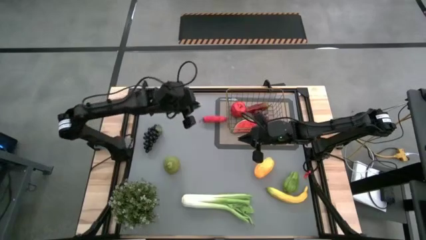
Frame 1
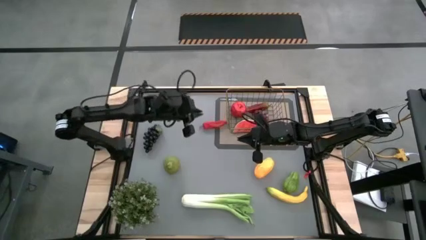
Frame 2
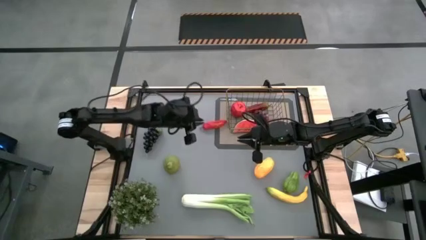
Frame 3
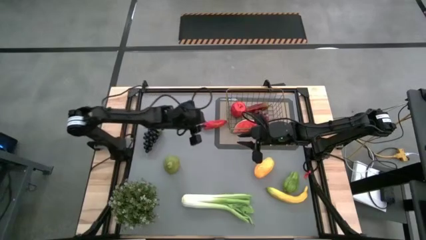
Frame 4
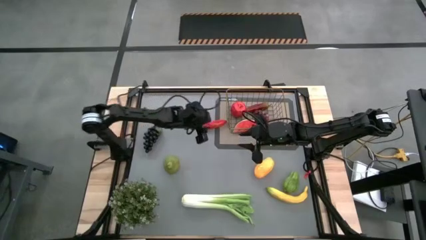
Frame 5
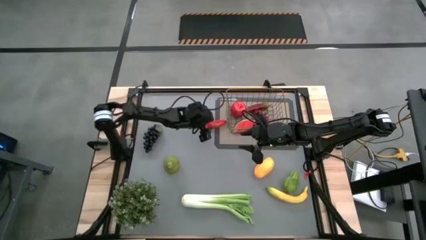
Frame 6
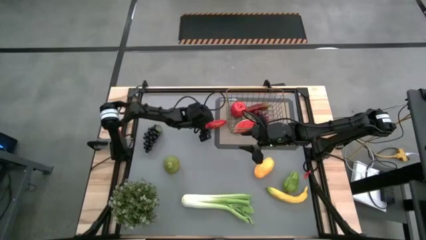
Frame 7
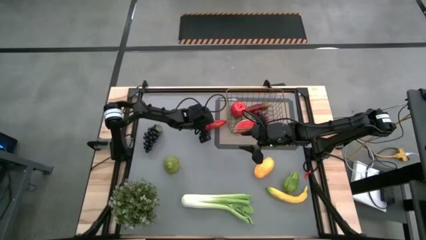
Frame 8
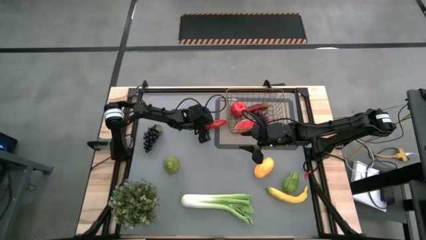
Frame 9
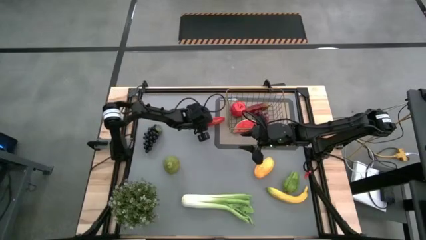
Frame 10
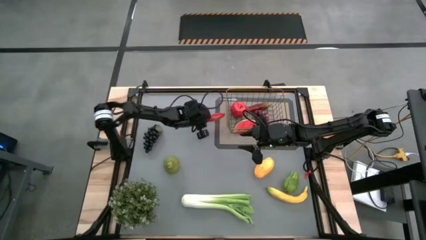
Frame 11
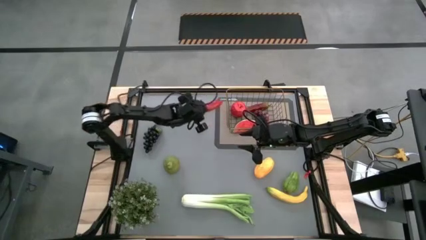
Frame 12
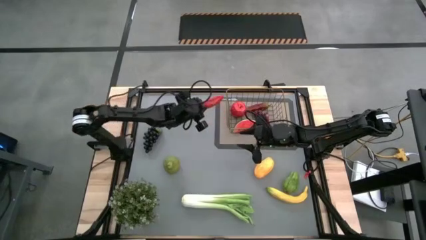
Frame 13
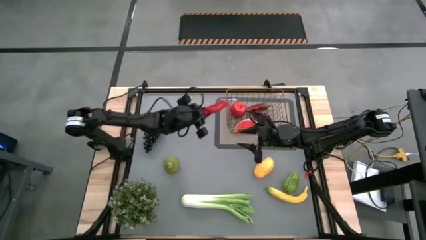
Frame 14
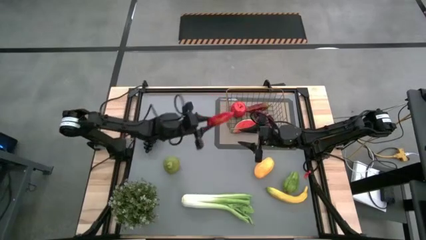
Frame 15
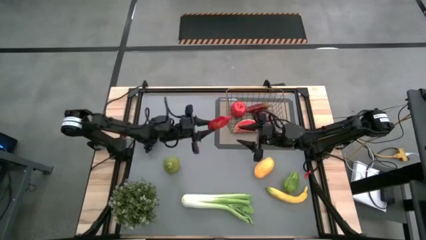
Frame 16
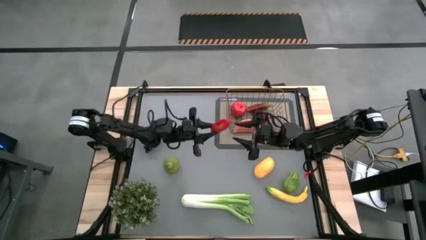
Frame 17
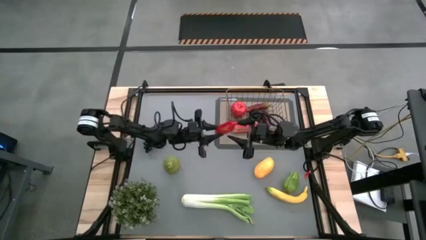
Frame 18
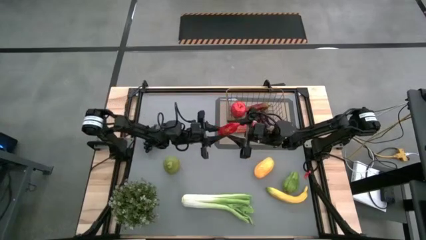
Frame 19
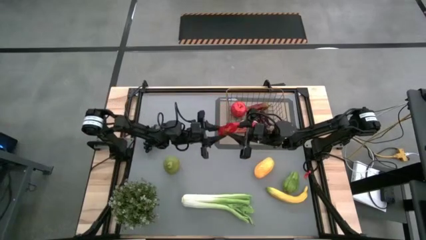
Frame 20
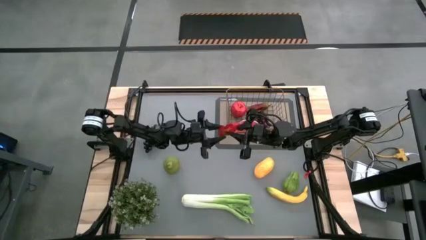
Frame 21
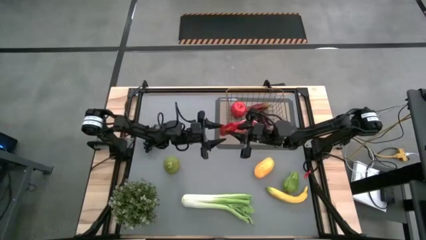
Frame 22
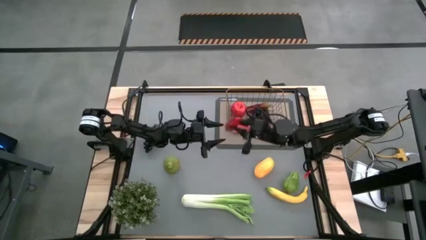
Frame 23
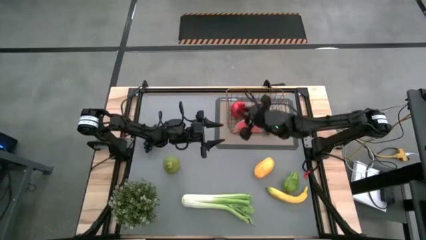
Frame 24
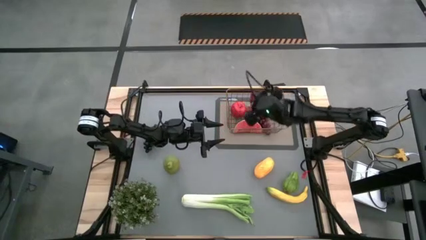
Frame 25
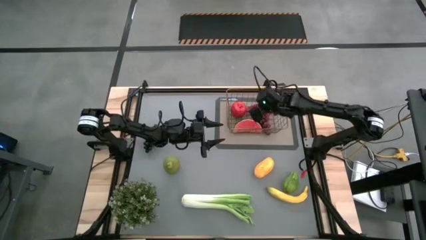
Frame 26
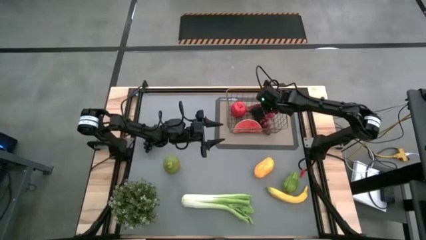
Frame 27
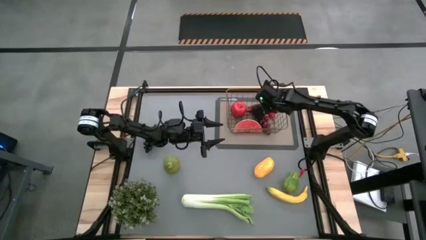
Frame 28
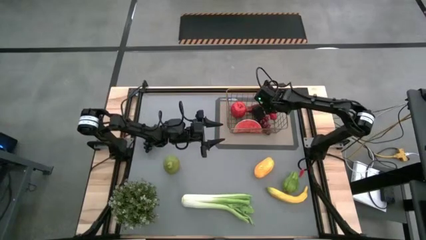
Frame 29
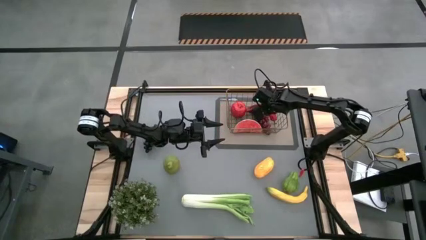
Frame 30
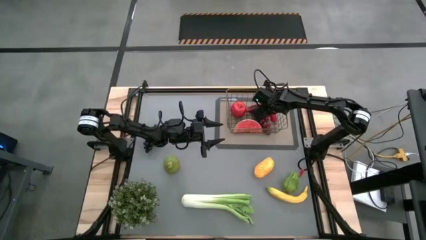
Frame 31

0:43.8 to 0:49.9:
Task: Build produce basket
Put the chili pepper into the wire basket

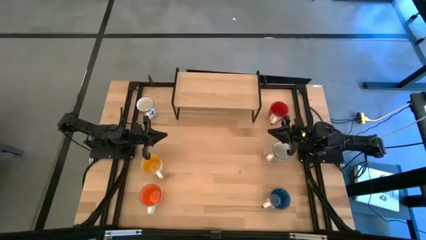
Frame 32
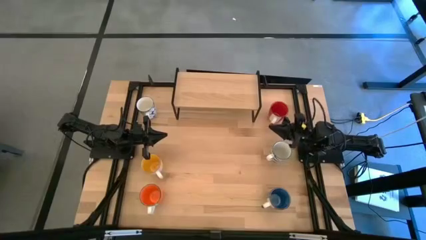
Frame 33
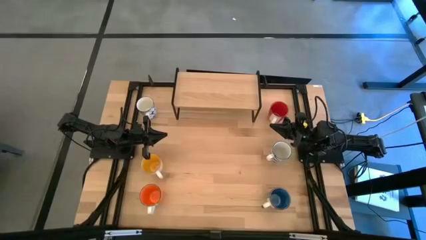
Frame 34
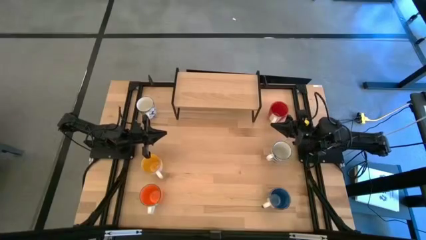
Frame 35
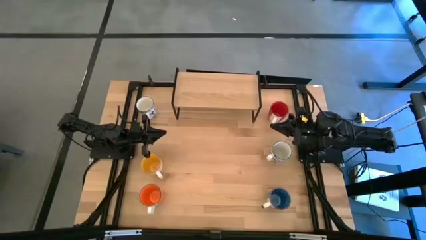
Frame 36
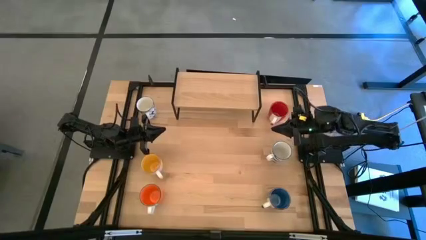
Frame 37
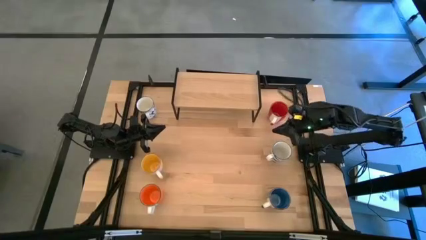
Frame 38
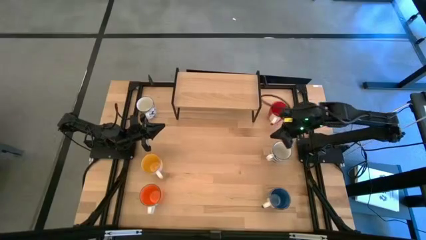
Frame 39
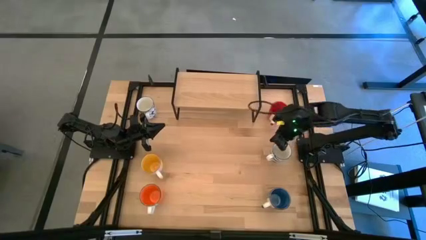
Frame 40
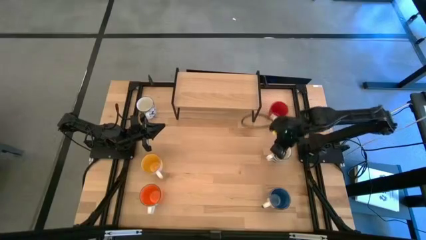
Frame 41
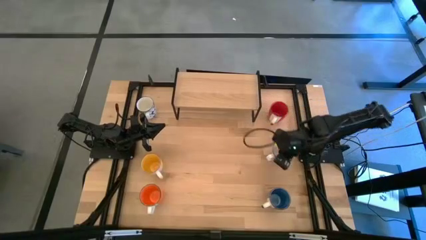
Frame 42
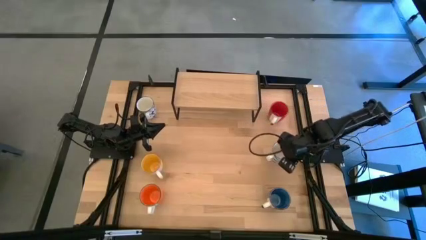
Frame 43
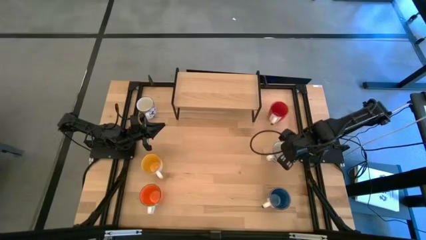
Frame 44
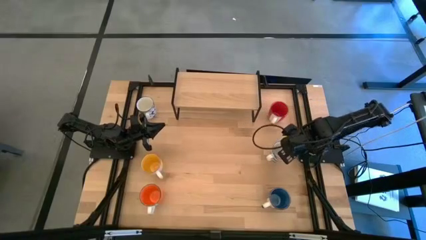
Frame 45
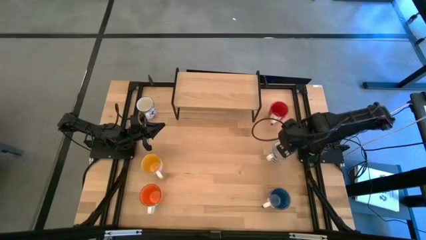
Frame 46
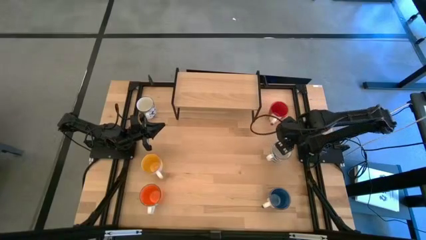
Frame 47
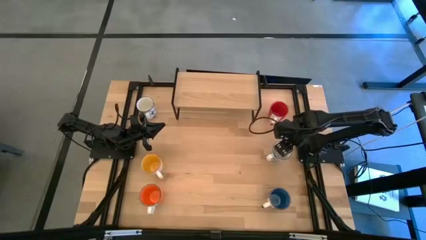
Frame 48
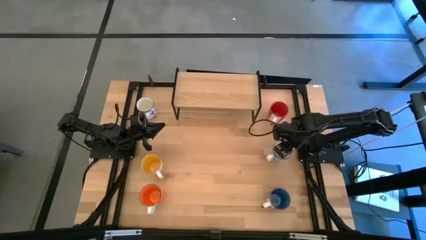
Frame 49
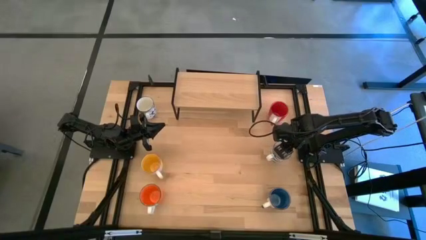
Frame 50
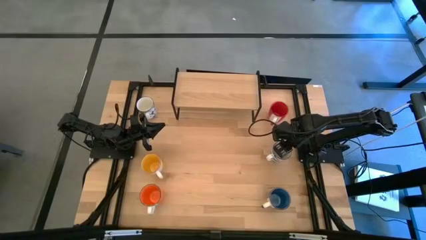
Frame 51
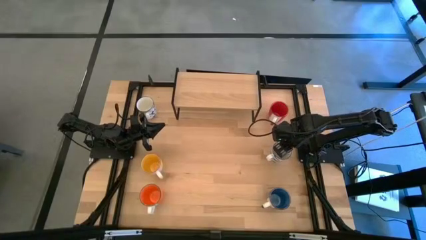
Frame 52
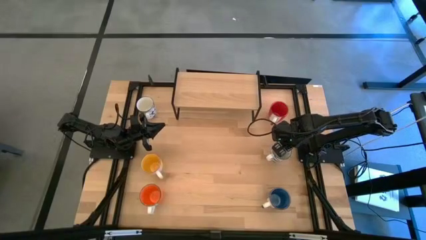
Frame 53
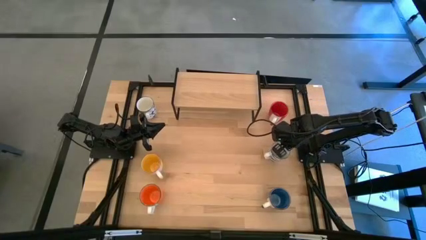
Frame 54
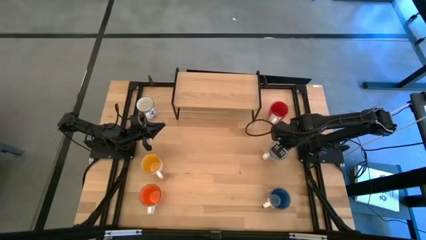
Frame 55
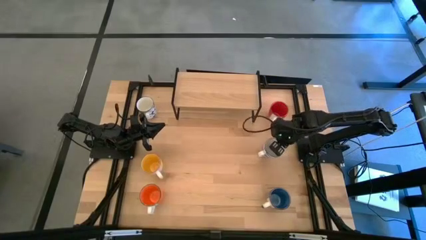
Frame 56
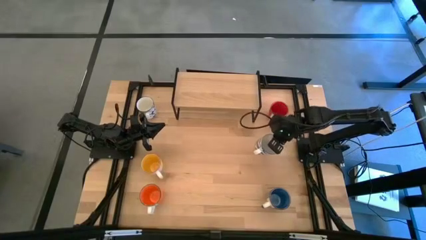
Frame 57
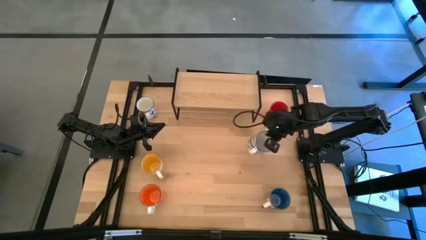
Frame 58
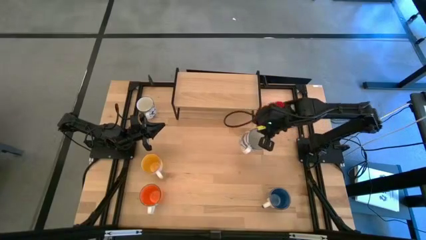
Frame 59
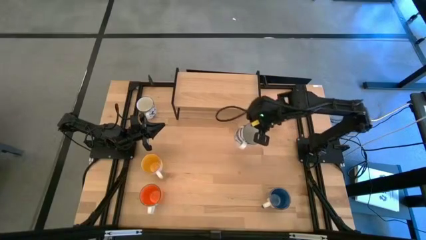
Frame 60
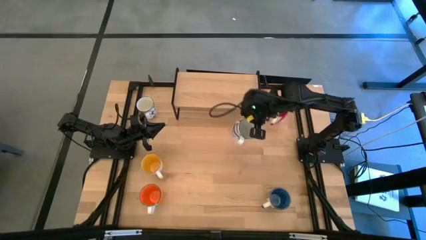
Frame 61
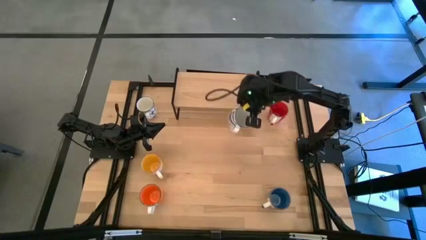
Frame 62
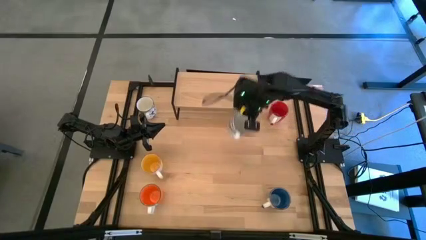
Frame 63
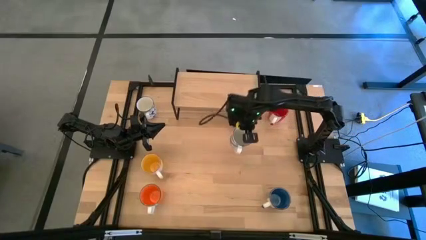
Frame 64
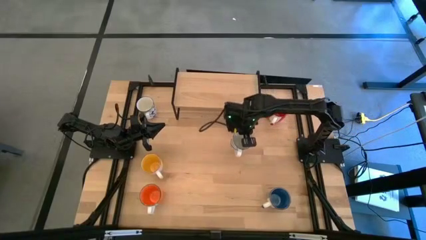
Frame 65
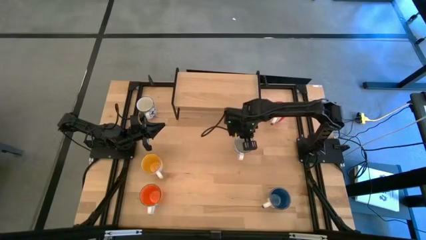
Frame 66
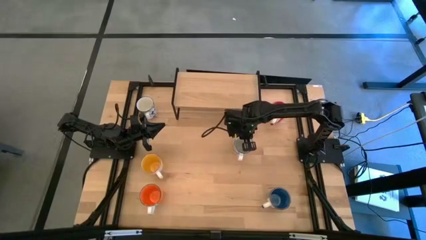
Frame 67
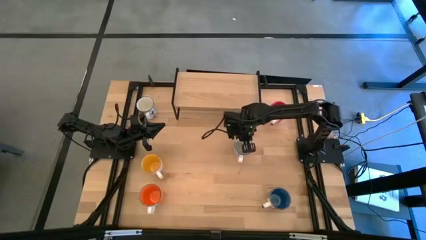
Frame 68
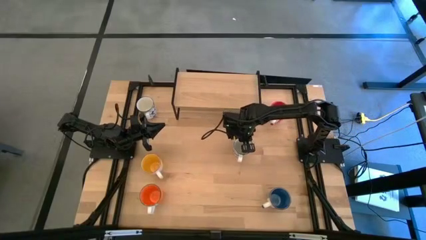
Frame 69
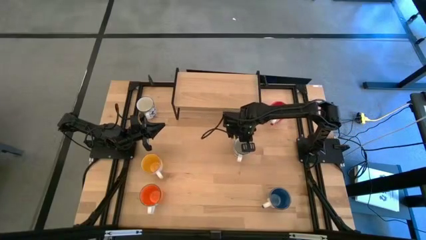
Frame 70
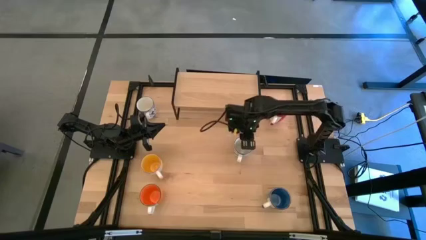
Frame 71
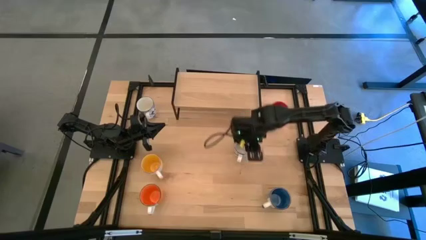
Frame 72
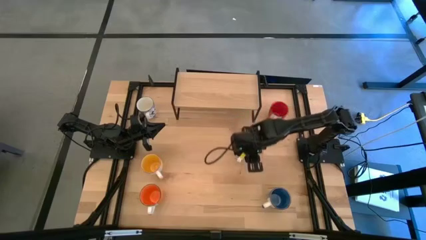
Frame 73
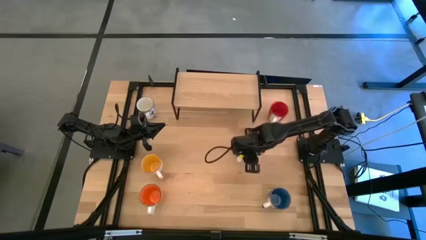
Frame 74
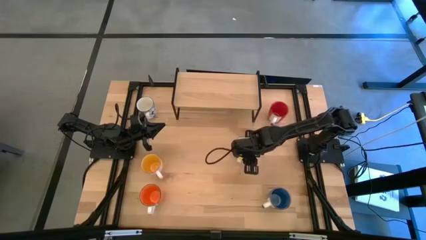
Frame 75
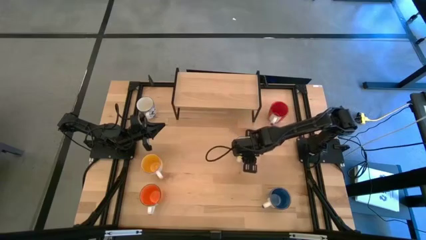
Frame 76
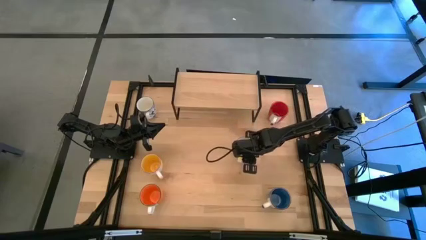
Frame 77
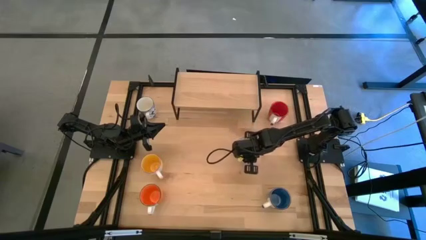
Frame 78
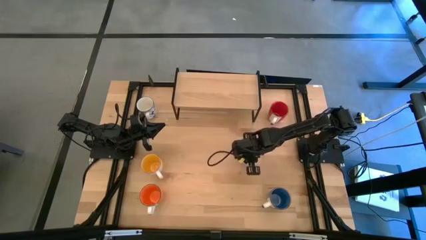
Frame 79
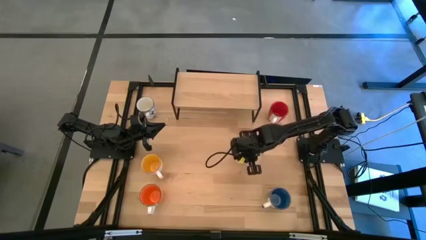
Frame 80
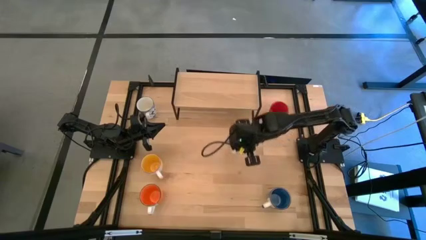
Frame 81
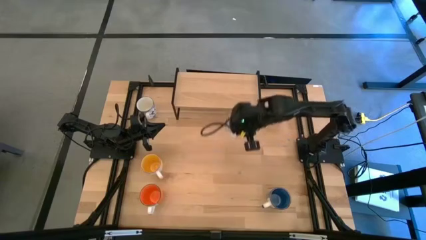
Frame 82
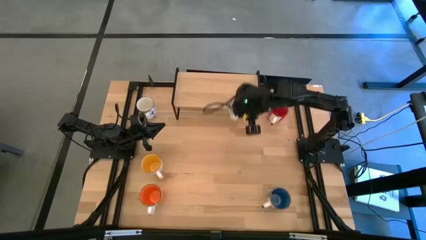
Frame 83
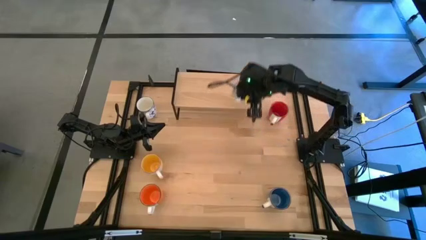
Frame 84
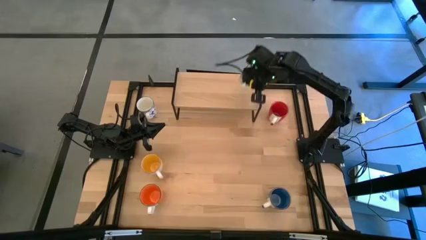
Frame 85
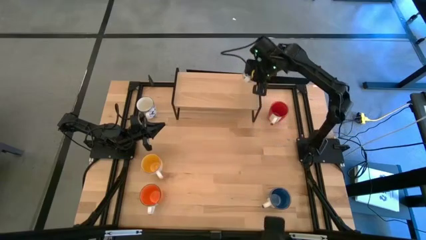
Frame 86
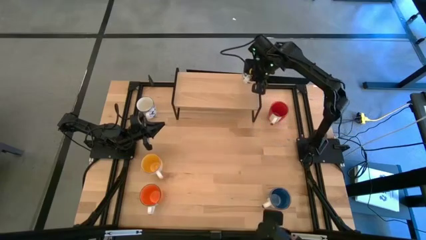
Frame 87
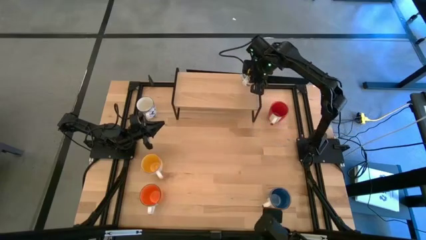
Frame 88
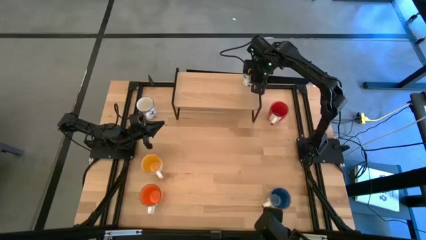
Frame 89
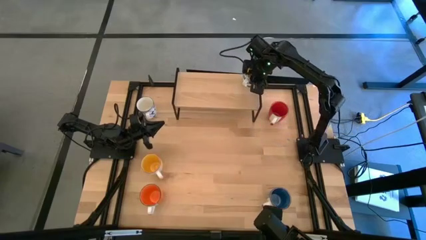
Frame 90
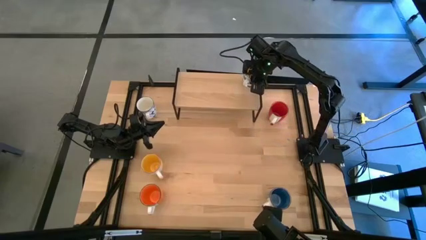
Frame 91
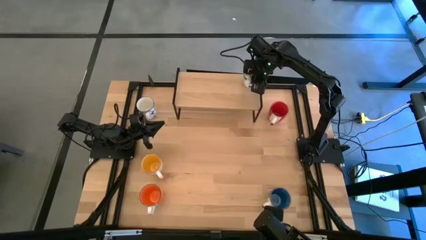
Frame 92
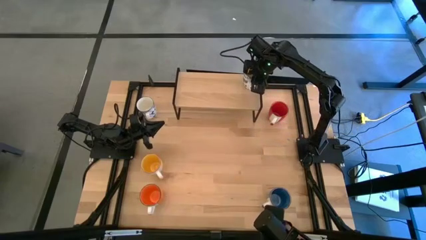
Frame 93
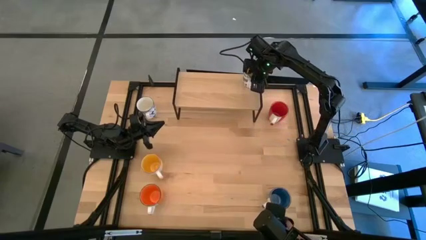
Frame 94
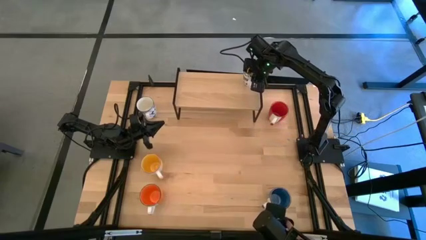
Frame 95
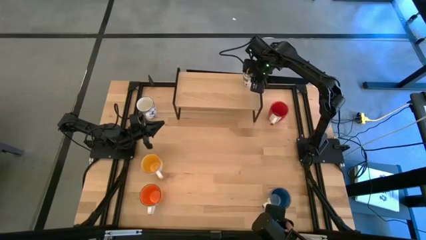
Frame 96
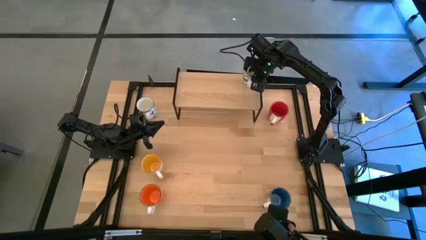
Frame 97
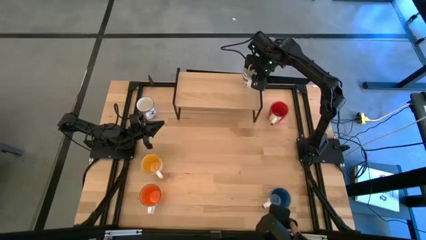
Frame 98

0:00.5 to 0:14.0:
Task: Place coffee mugs
Put the blue patterned mug on the shelf
